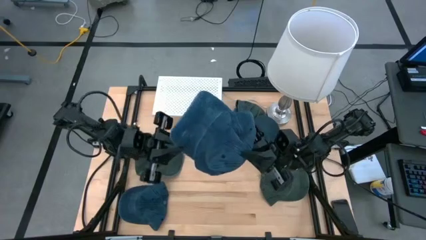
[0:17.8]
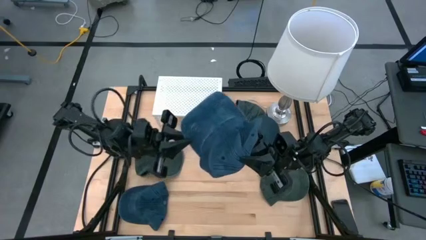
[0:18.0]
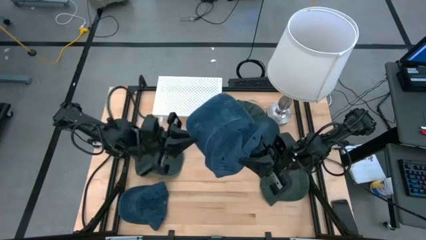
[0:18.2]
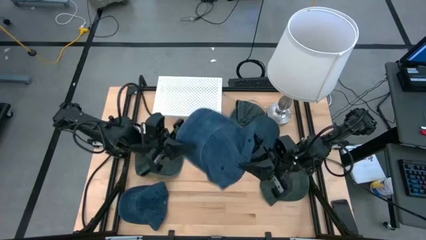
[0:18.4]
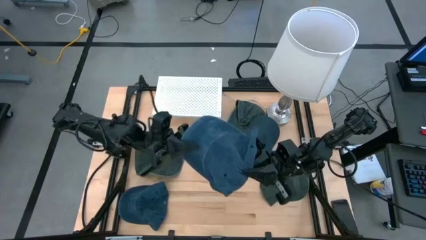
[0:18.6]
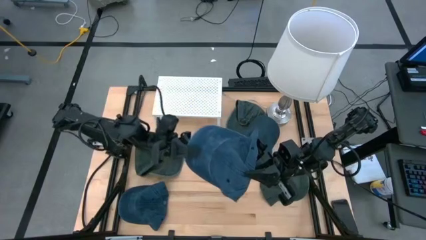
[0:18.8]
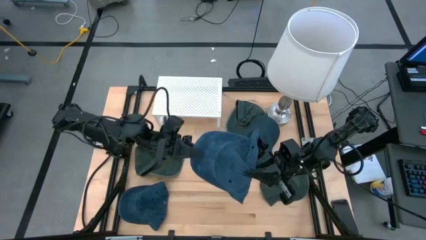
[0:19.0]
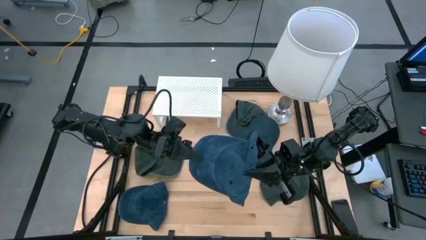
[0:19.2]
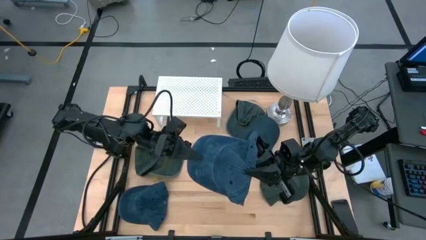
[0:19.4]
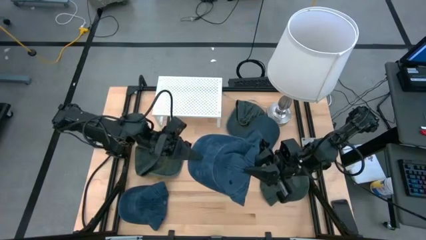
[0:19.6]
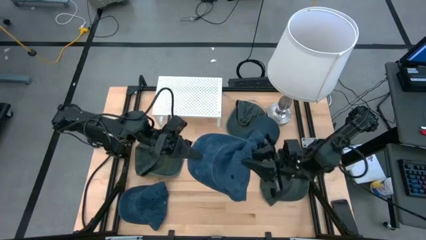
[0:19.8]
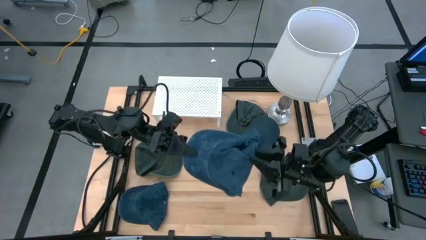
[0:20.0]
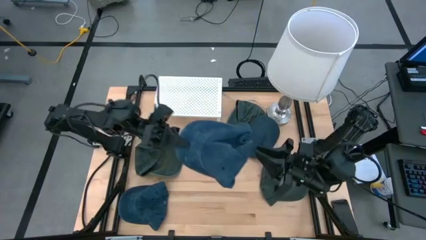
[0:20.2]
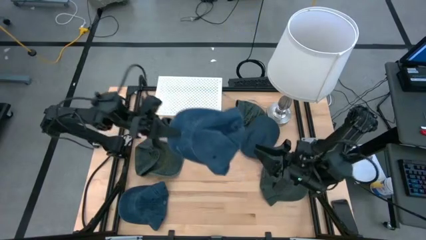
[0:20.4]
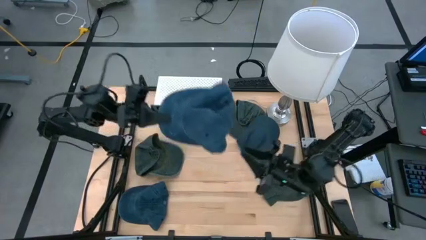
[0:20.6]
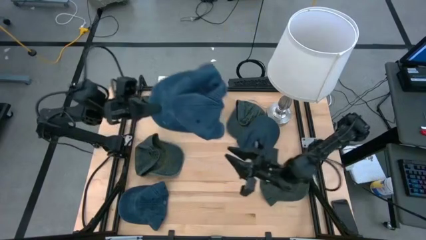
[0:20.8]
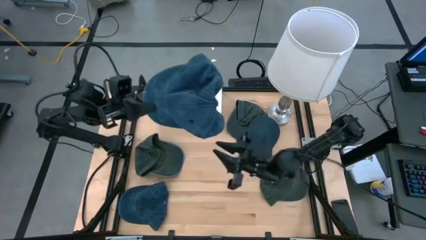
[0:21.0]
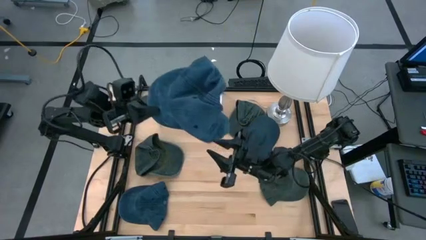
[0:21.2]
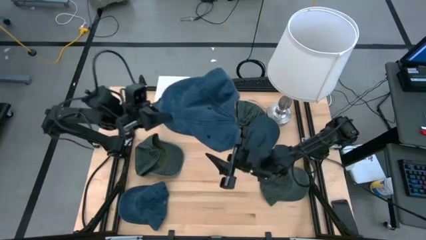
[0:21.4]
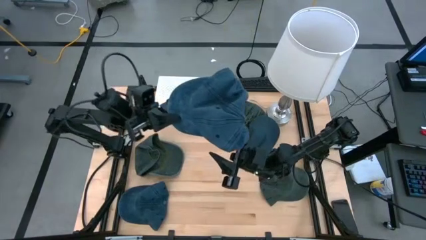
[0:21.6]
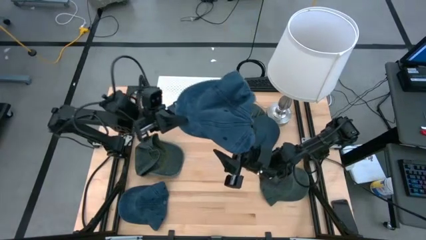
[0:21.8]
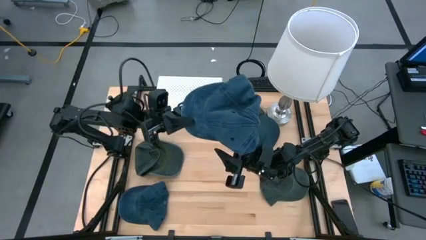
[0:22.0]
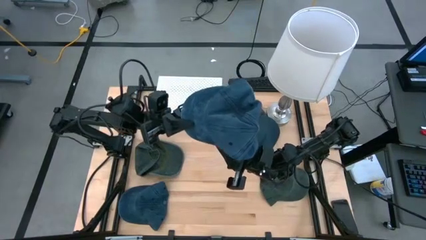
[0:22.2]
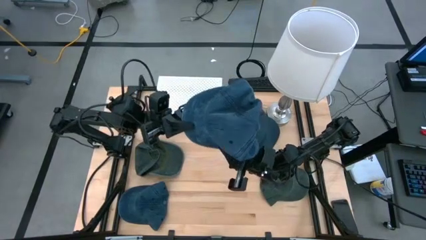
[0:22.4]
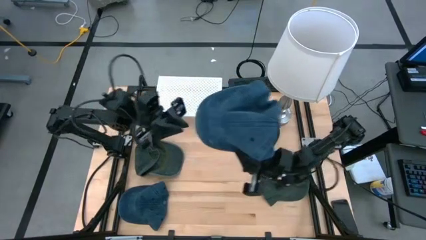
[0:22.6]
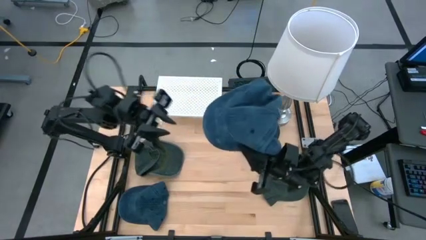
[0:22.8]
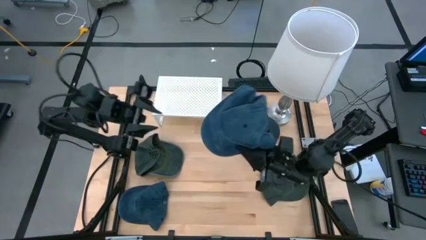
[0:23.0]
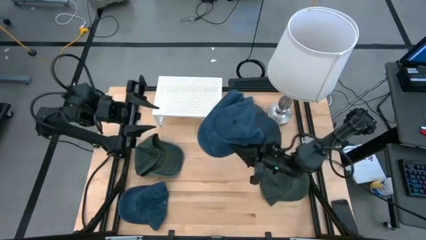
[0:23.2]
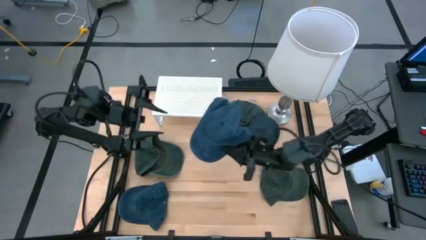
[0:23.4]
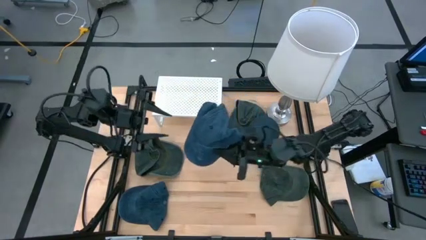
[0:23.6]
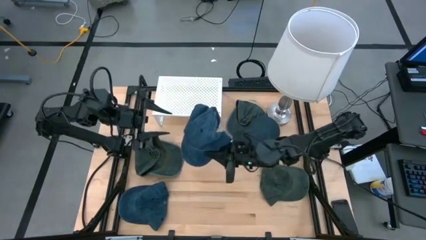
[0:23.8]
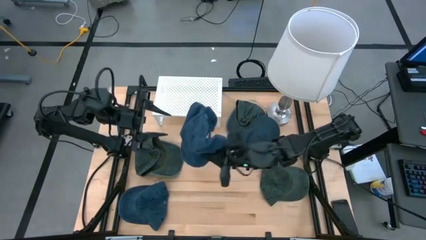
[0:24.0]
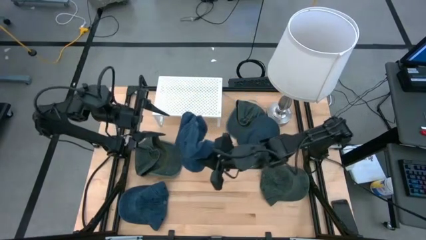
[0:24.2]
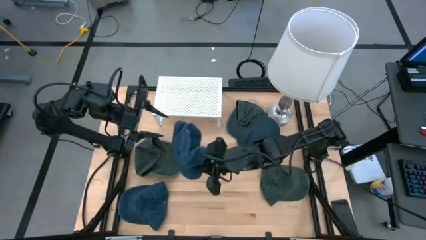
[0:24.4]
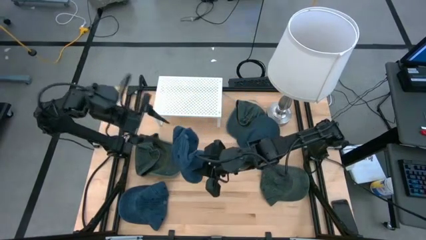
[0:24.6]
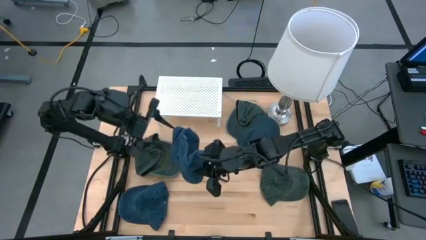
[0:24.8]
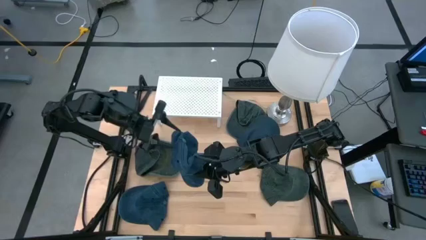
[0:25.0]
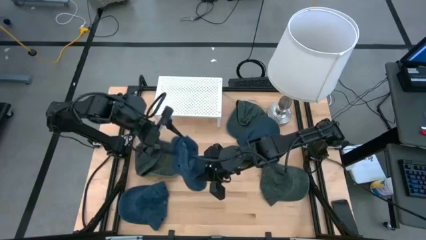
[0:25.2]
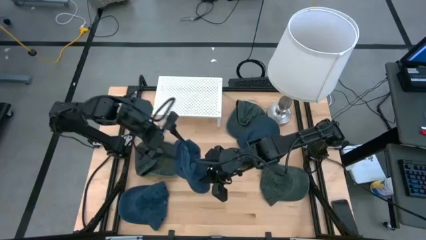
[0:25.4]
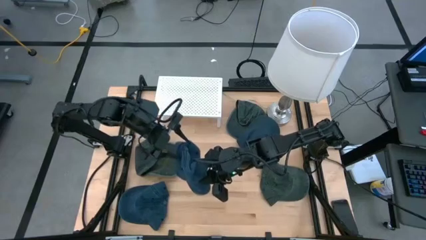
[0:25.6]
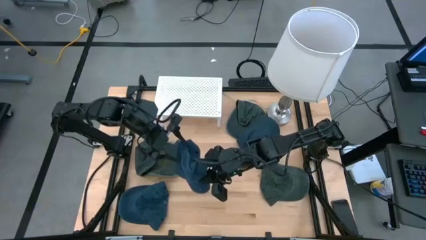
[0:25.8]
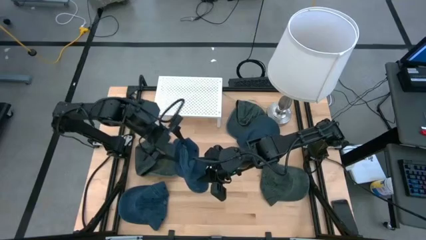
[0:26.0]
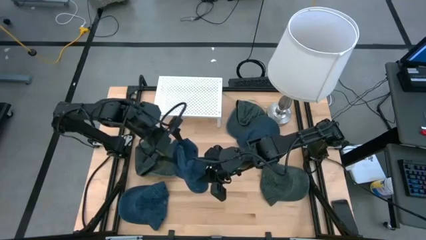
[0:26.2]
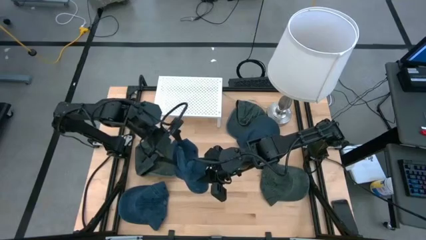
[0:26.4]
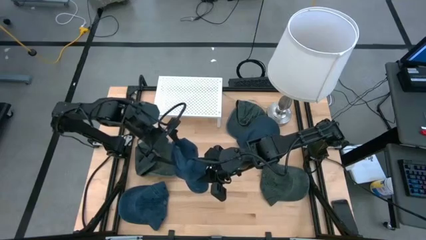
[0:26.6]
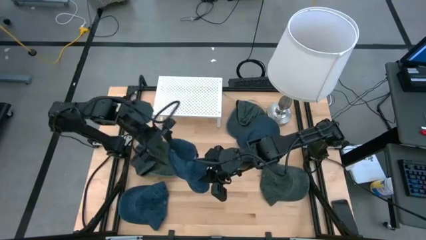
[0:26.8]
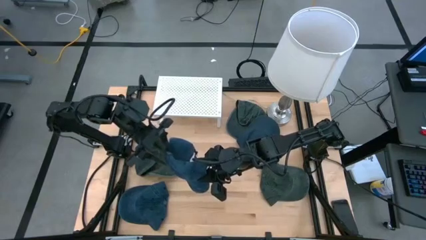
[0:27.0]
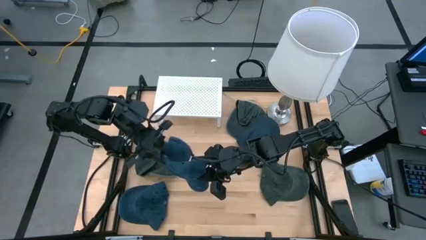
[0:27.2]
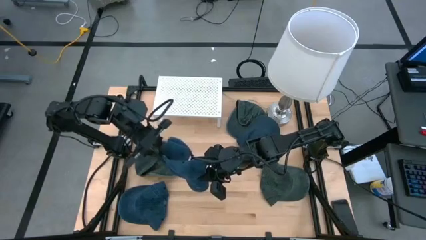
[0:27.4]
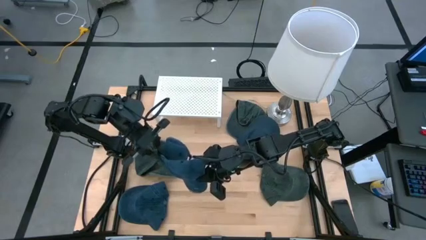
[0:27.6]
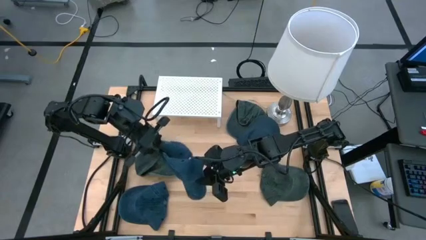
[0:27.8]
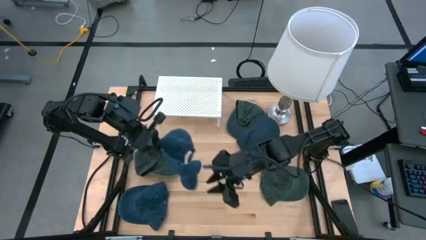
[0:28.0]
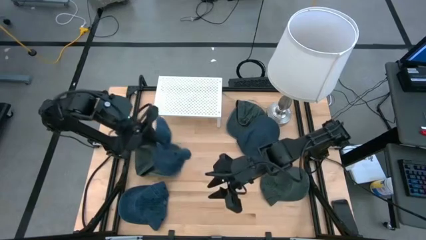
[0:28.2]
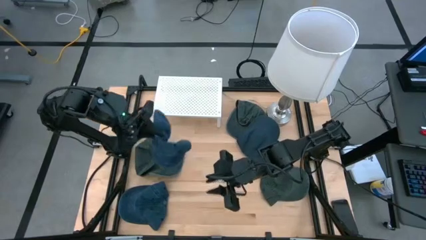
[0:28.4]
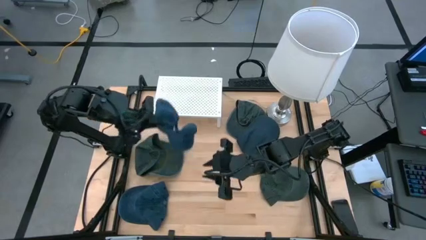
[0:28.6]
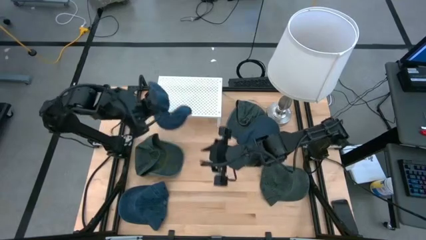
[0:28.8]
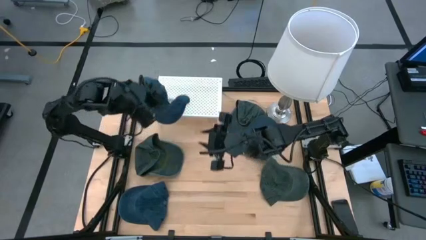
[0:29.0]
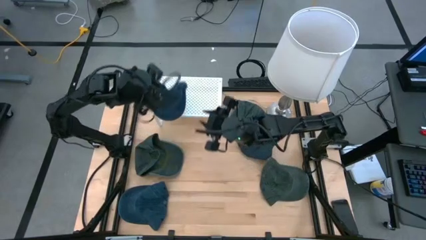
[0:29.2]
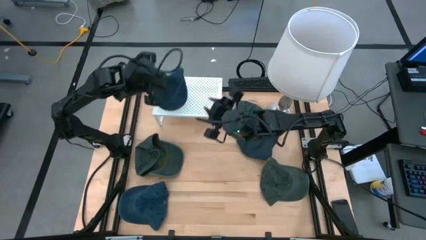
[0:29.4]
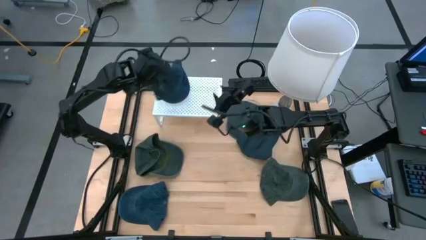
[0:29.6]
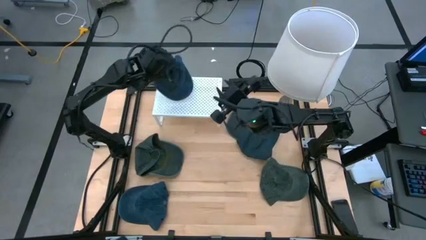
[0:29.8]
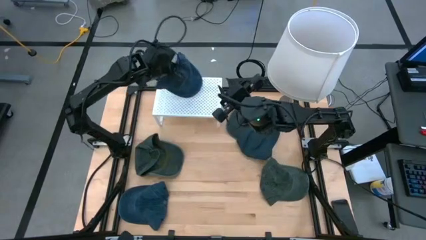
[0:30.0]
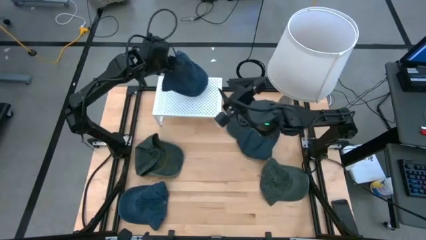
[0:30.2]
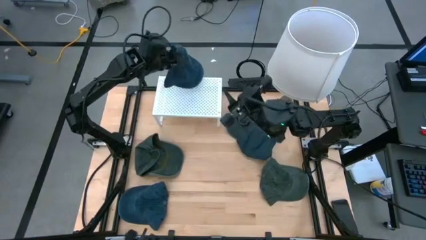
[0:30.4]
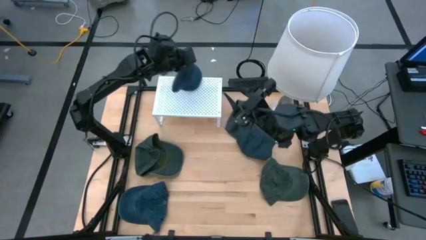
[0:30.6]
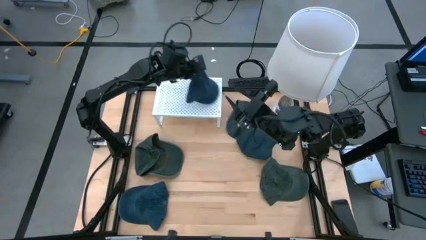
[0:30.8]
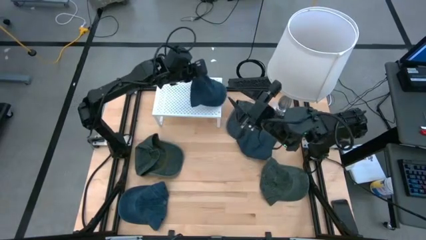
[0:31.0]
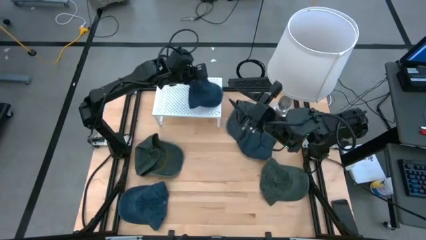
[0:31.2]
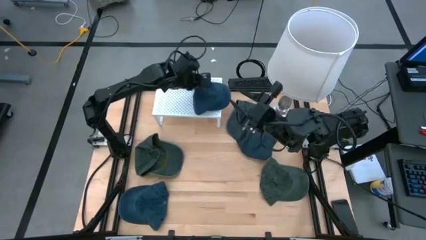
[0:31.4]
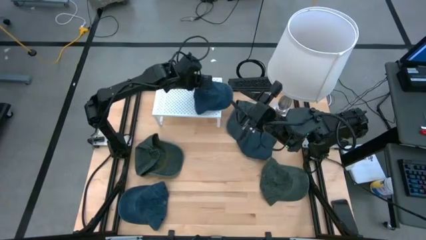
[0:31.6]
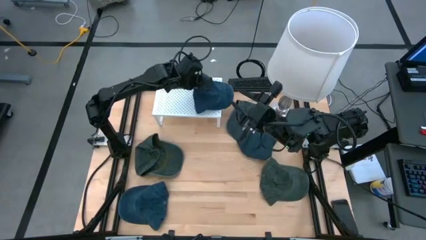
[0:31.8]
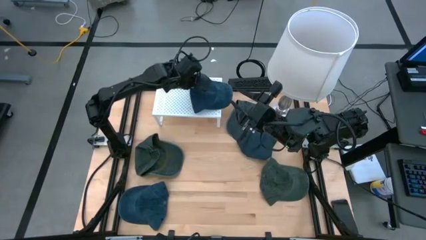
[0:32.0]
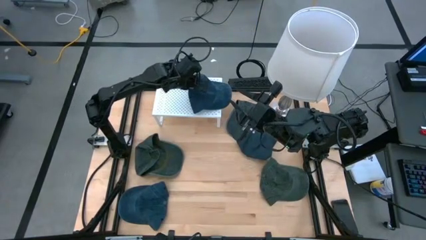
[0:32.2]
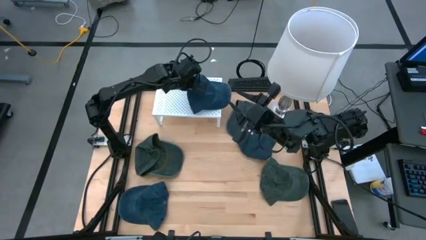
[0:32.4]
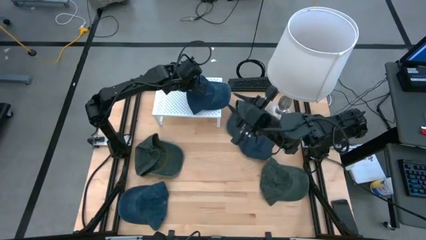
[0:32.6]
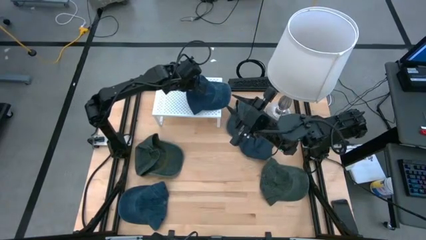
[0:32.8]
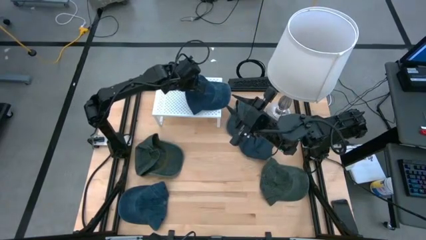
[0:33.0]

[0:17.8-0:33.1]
Task: Pick & Place hat
Put the bottom right blue cap on the shelf
